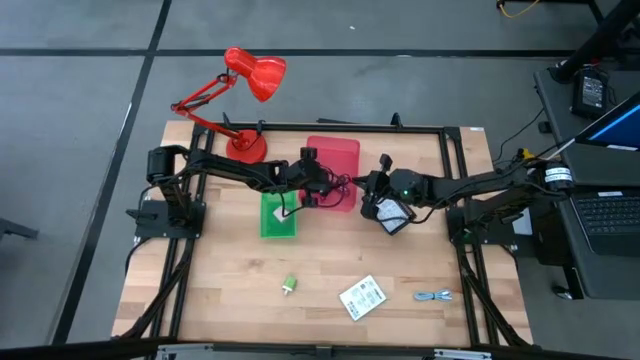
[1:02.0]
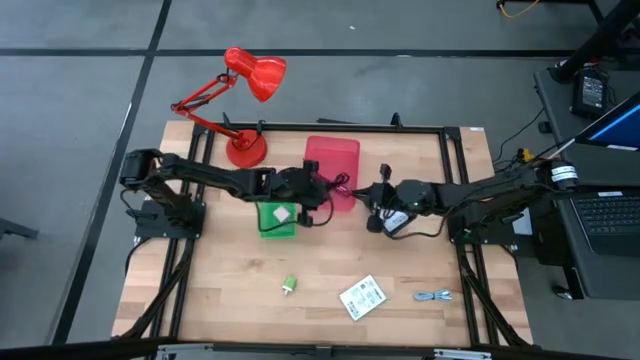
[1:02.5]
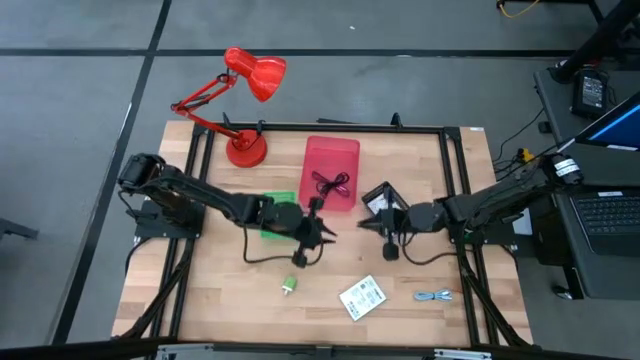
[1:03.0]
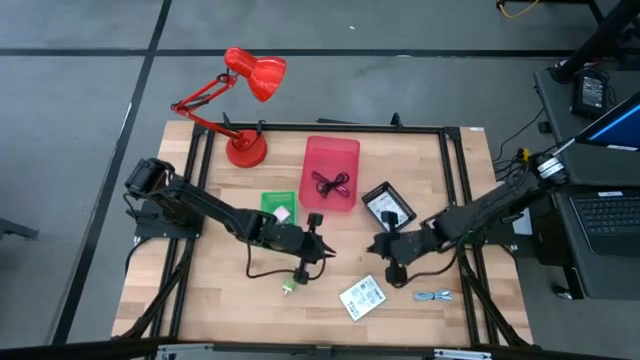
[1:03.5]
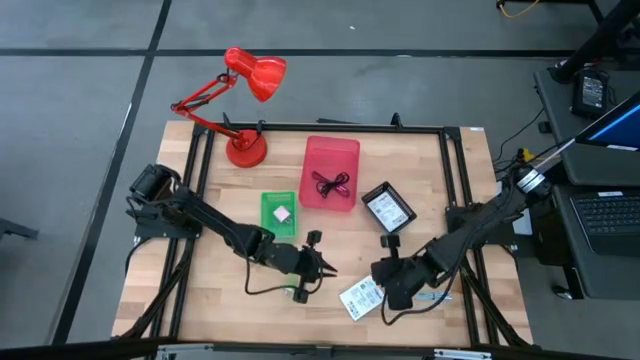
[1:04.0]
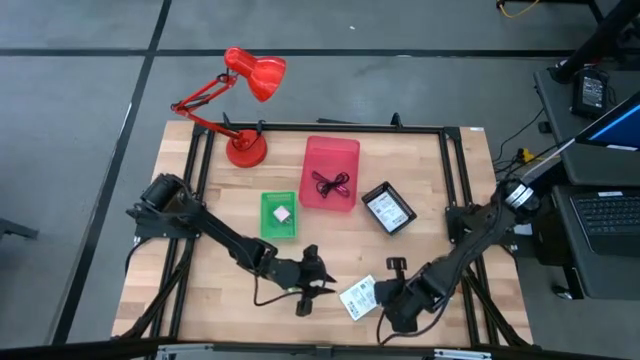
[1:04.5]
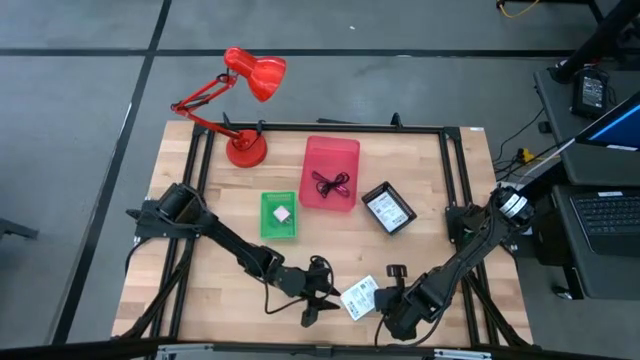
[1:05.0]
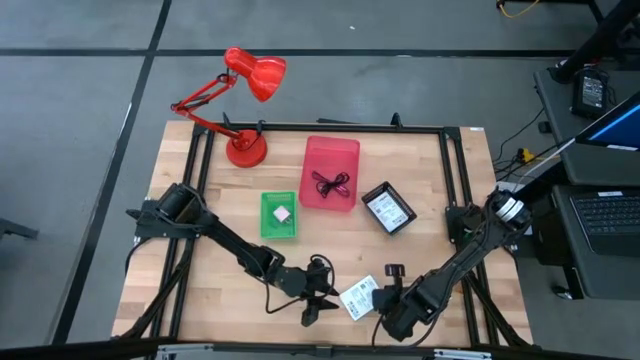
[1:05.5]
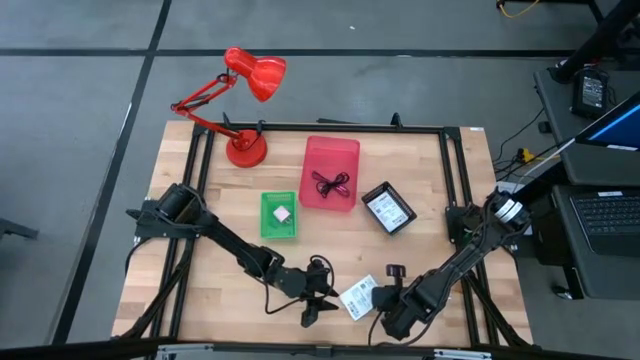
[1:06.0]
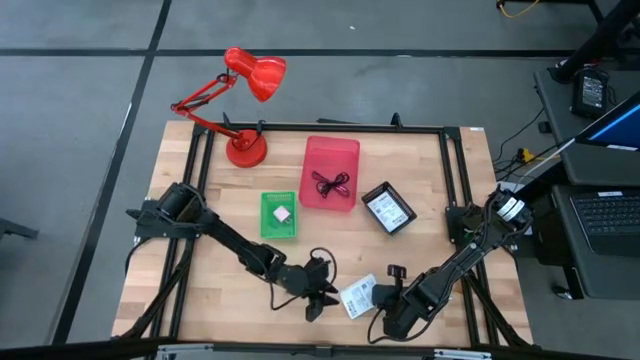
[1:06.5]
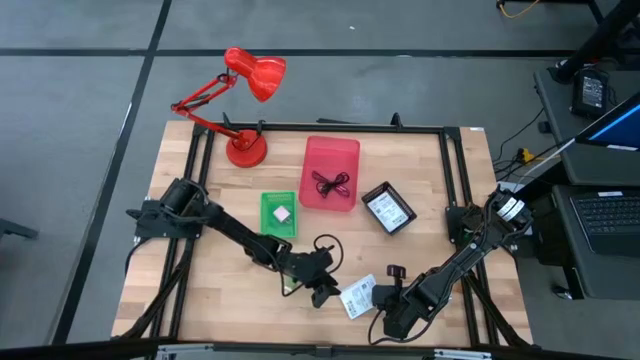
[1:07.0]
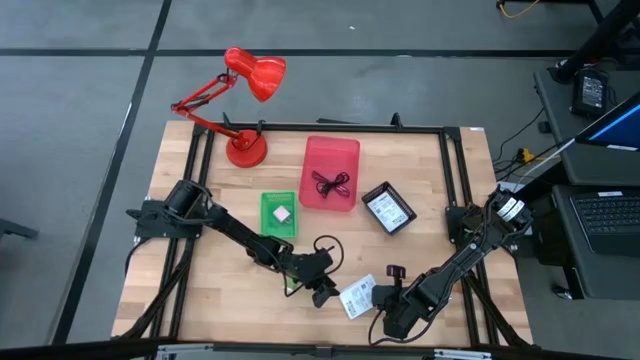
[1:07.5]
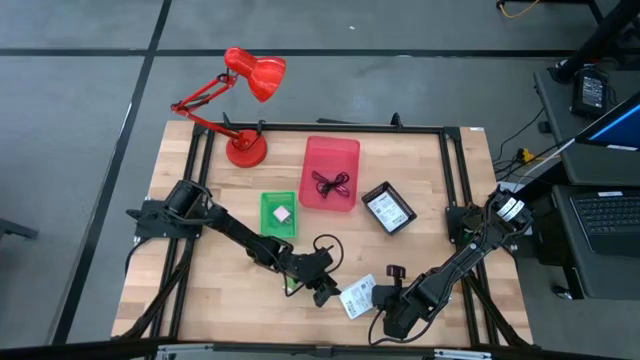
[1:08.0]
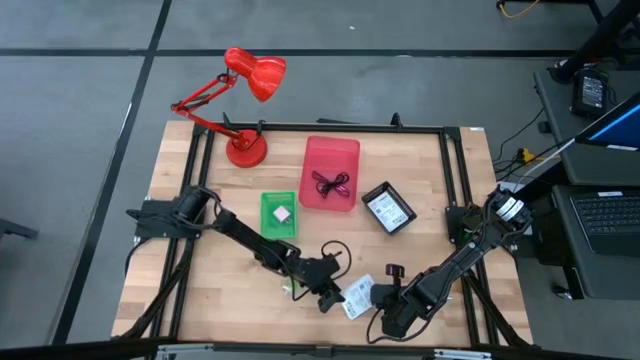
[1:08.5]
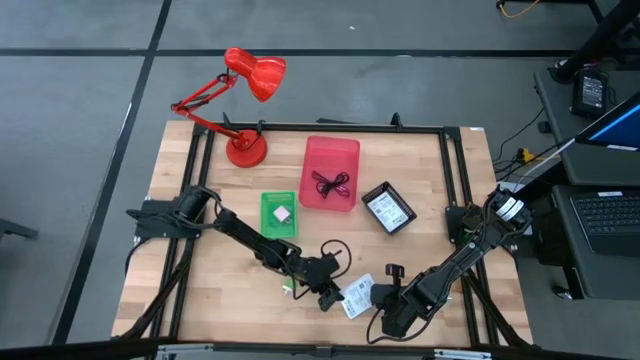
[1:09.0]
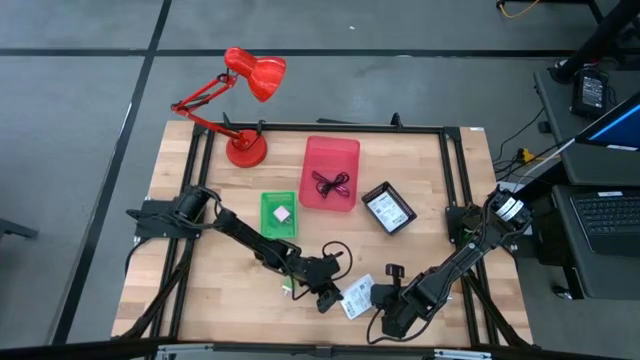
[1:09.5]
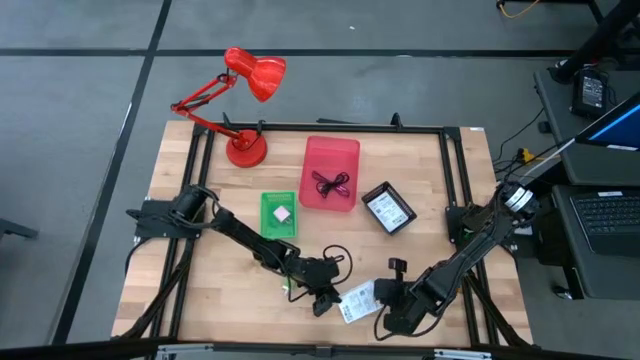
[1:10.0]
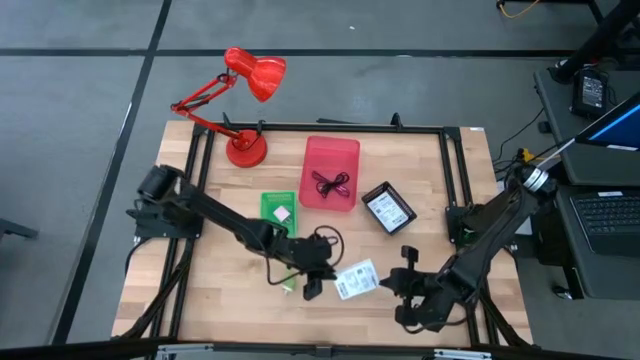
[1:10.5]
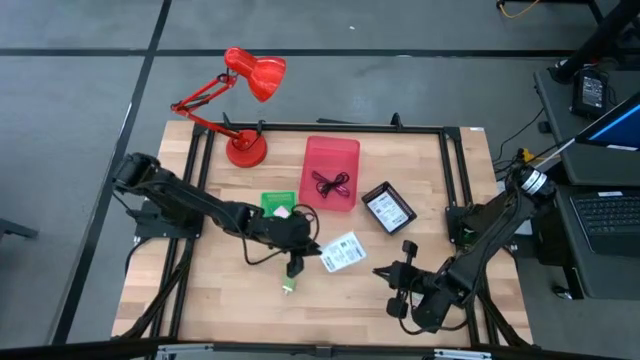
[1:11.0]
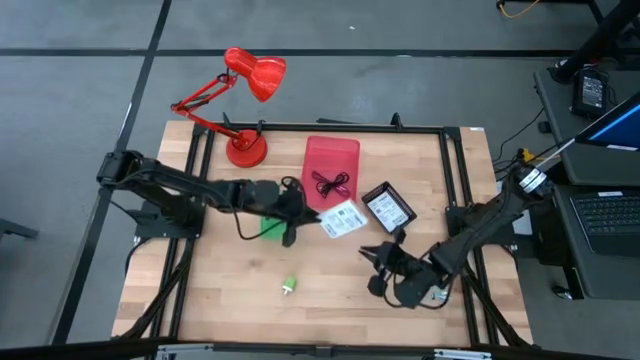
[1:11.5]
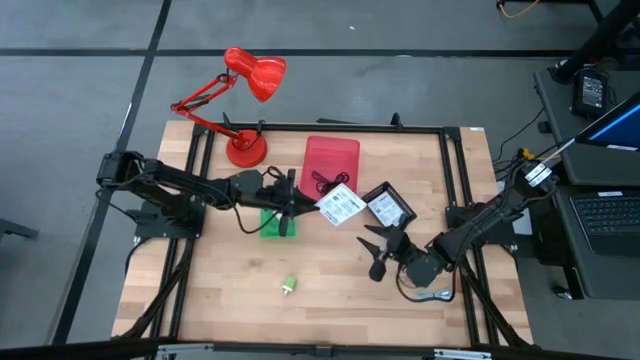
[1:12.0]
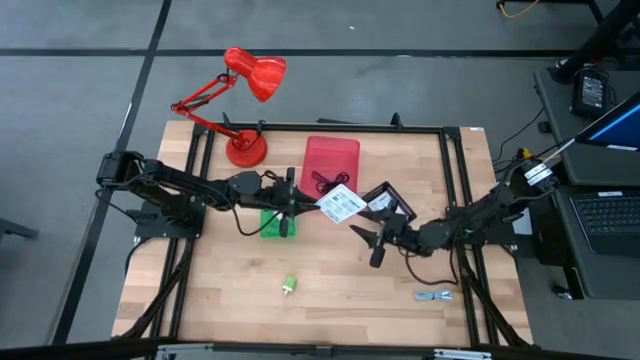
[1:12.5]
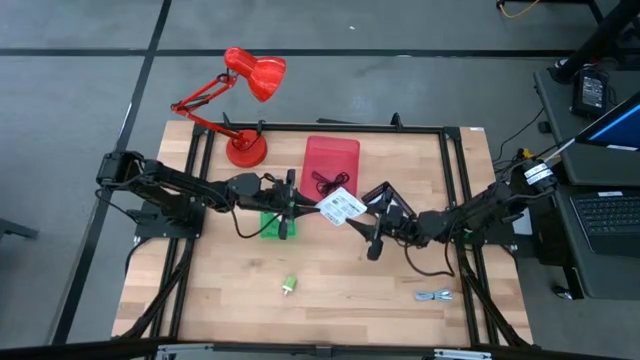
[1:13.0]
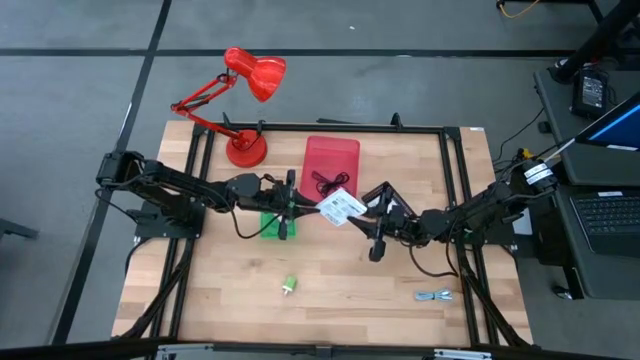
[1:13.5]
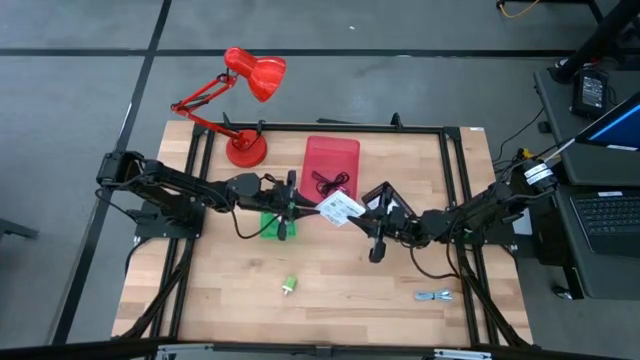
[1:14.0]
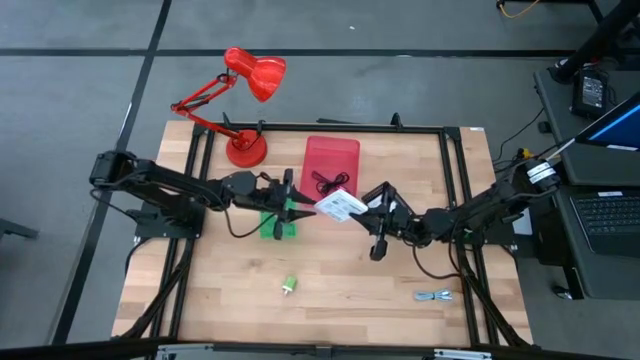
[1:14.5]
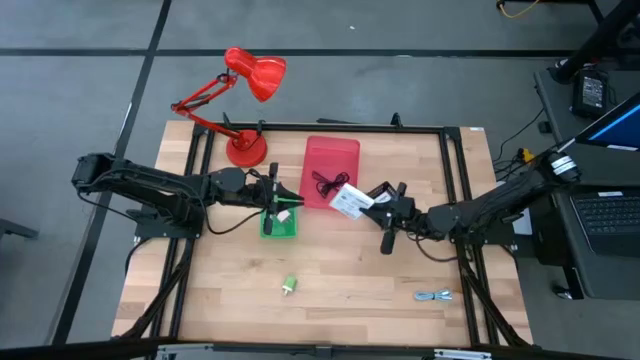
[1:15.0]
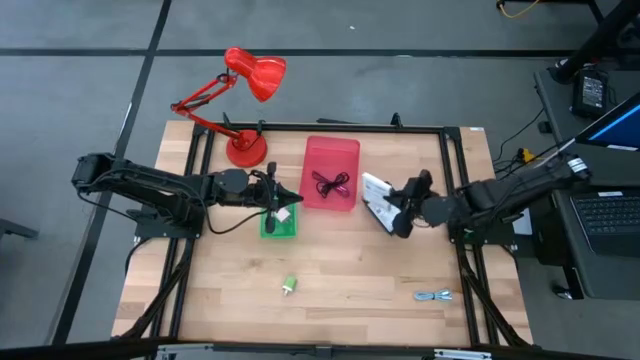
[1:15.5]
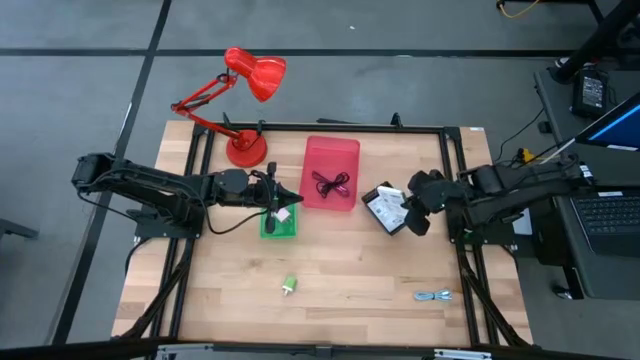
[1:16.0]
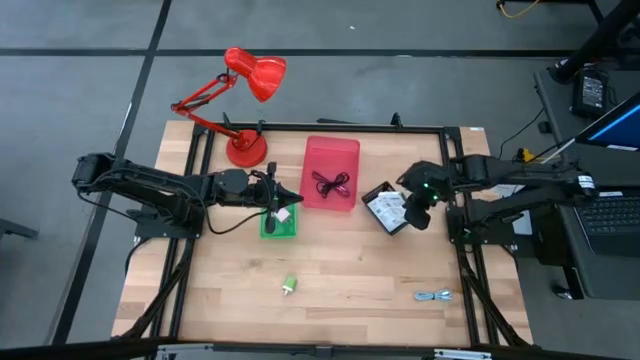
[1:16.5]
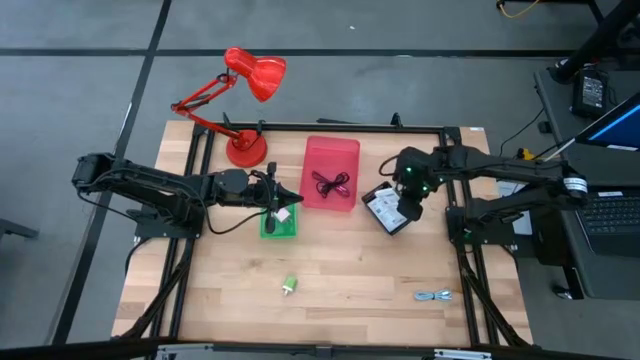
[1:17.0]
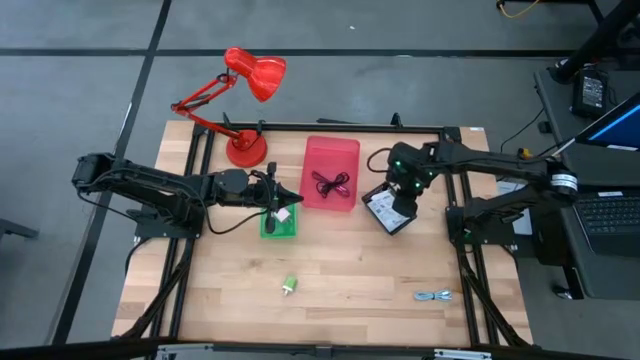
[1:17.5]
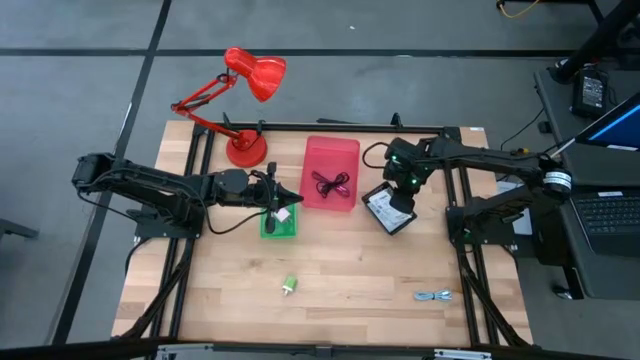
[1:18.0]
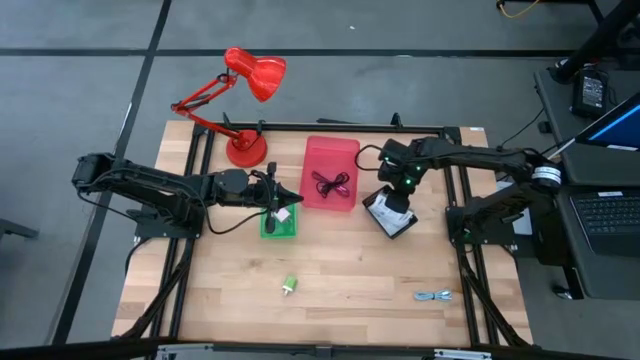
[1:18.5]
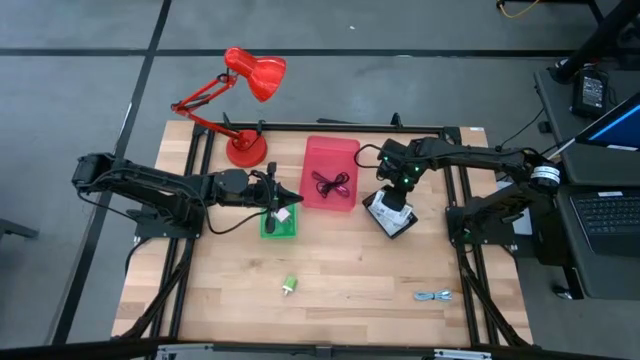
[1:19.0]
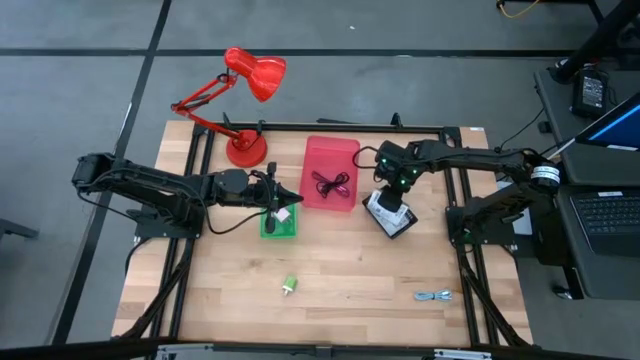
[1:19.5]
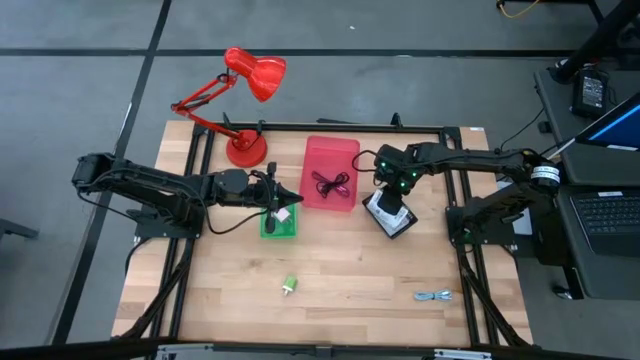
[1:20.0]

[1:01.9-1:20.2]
Task: Pick and place items into bin
Put the white card reader box into the black bin

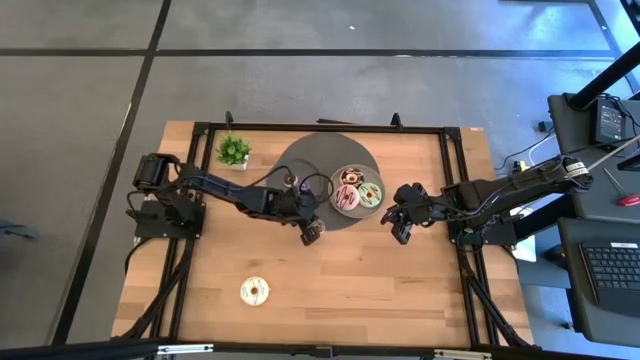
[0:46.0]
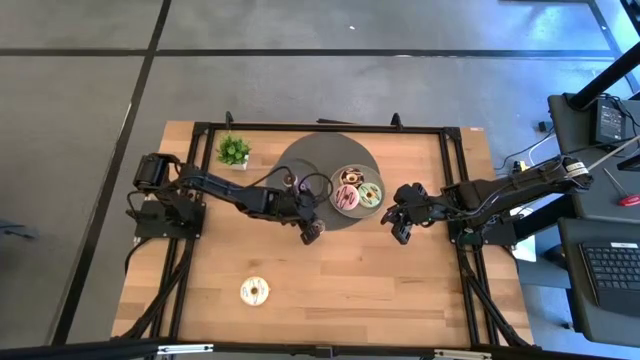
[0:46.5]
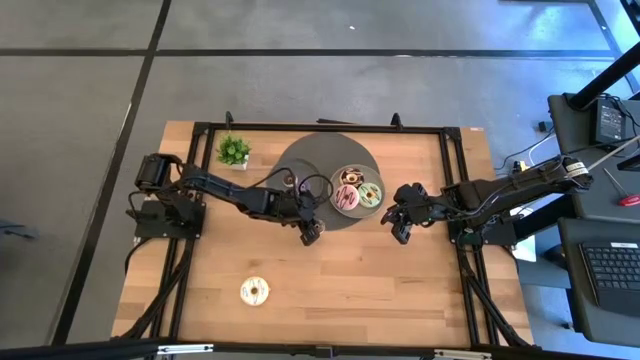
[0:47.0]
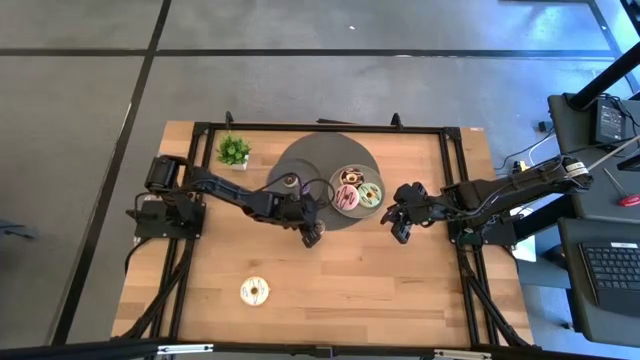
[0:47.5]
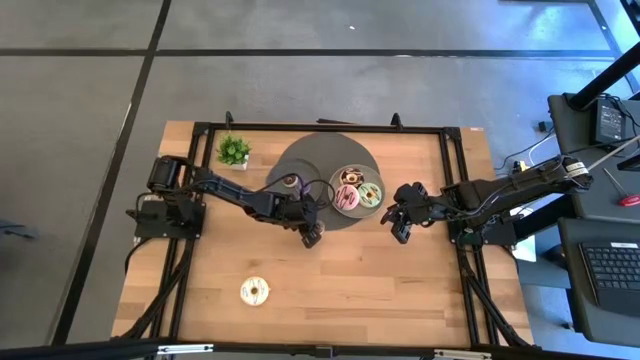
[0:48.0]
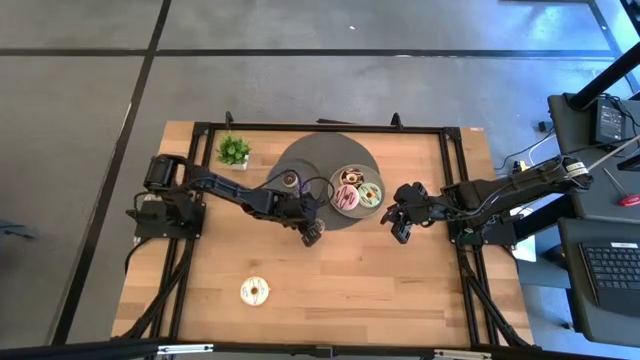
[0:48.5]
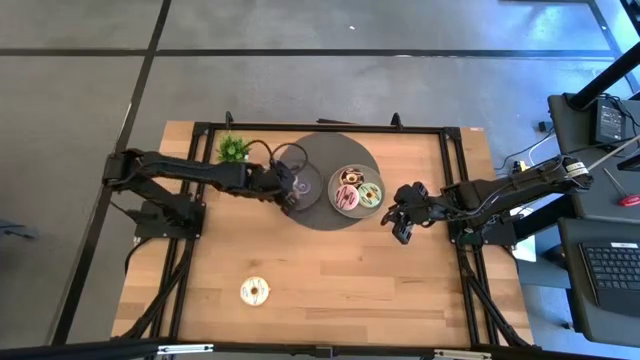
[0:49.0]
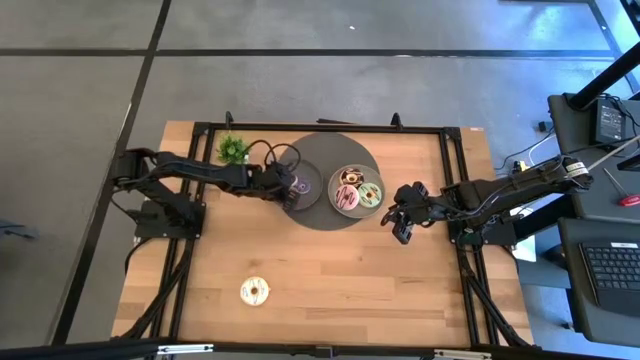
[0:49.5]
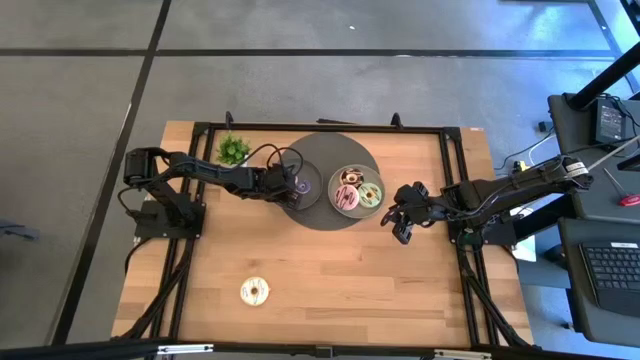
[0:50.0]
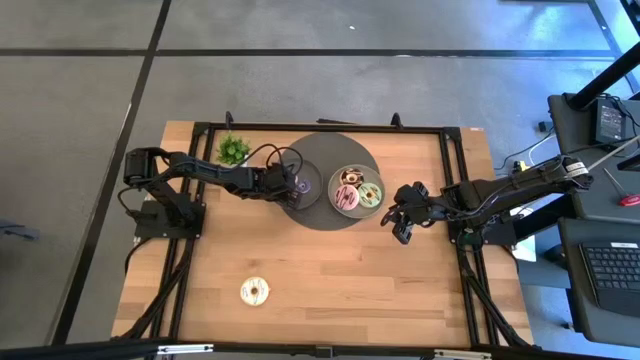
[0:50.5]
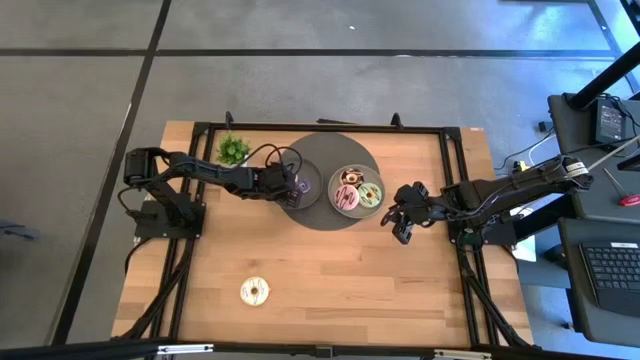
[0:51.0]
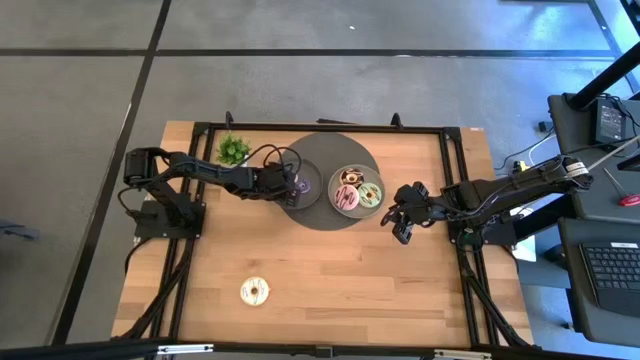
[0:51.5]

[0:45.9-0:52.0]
Task: Pick & Place donuts
Put the small brown donut on the dark gray plate
